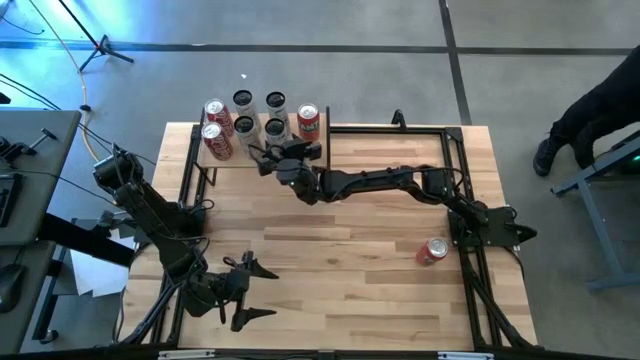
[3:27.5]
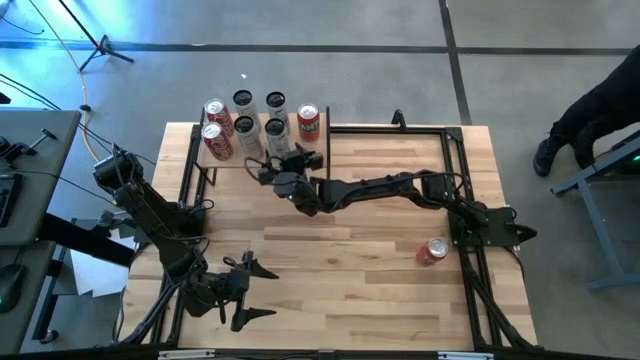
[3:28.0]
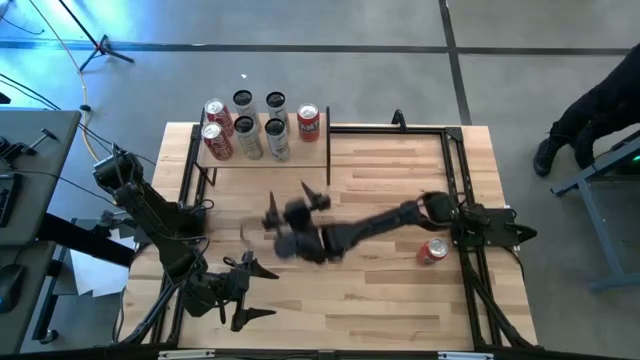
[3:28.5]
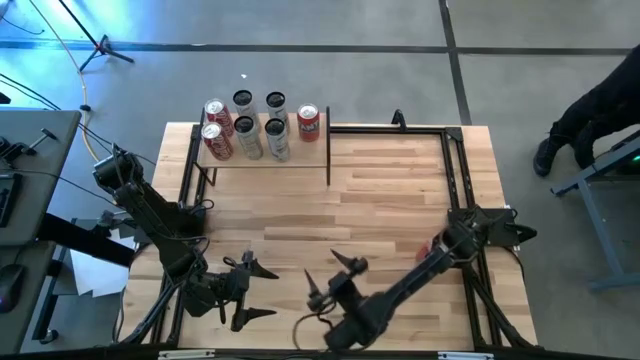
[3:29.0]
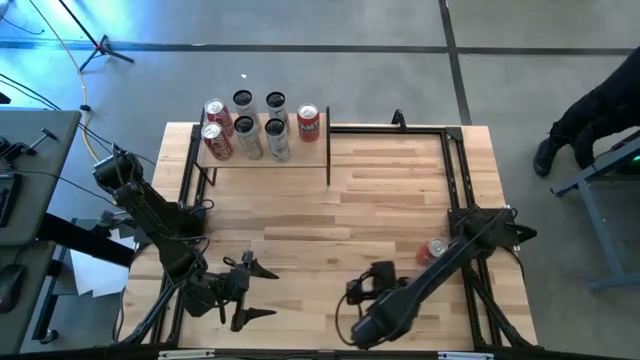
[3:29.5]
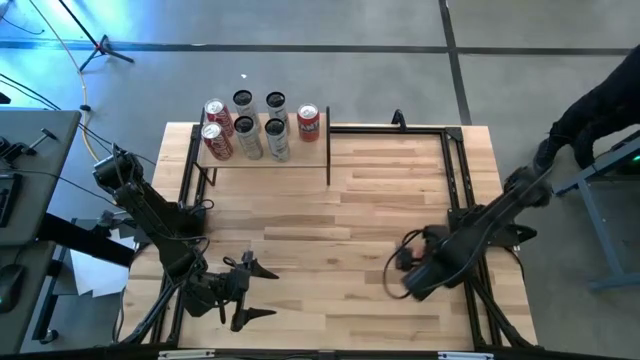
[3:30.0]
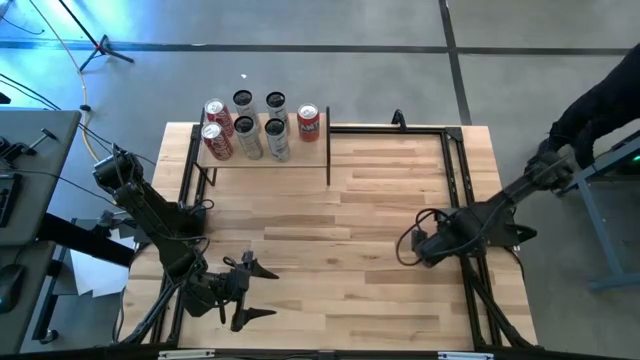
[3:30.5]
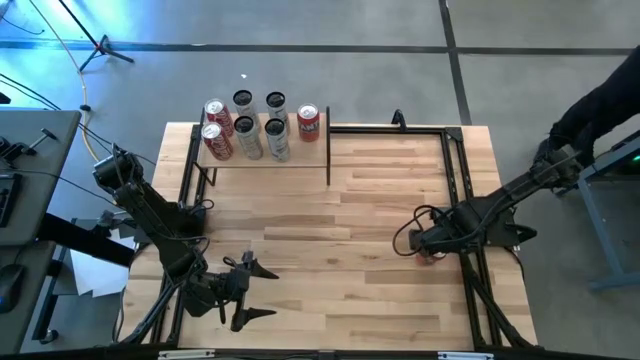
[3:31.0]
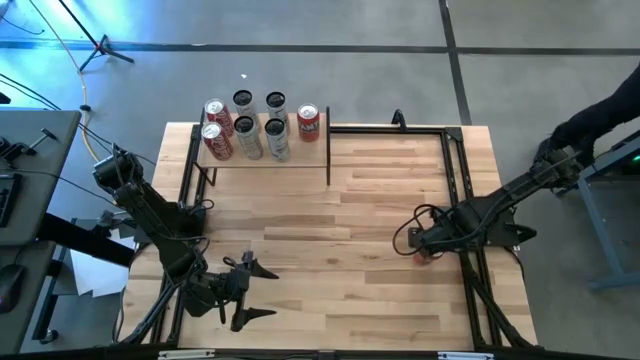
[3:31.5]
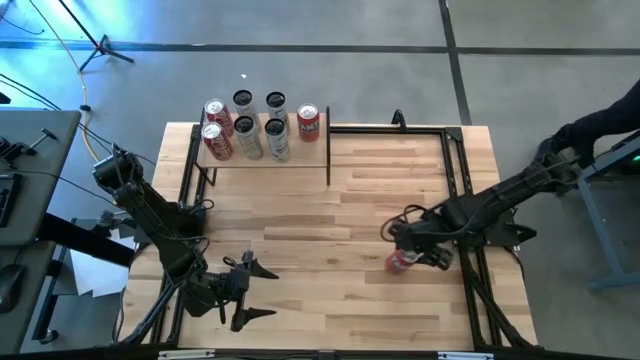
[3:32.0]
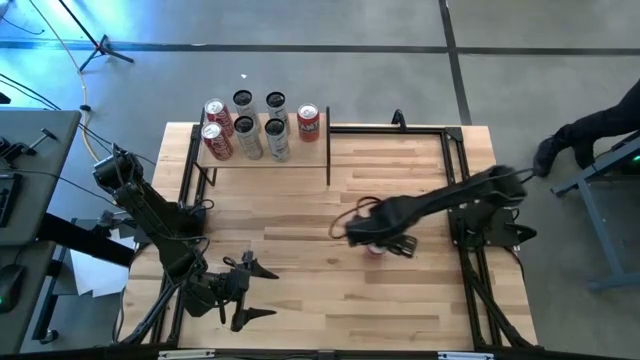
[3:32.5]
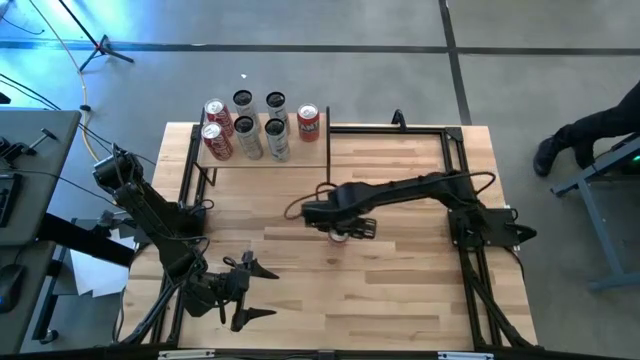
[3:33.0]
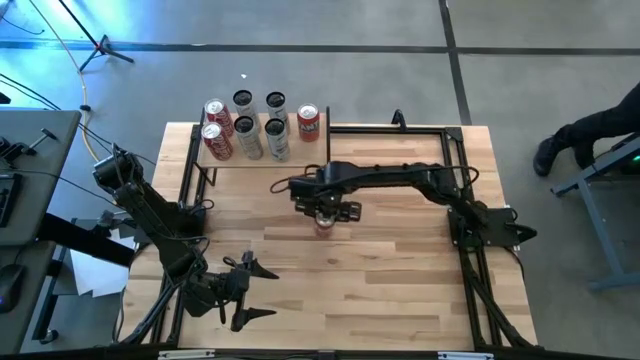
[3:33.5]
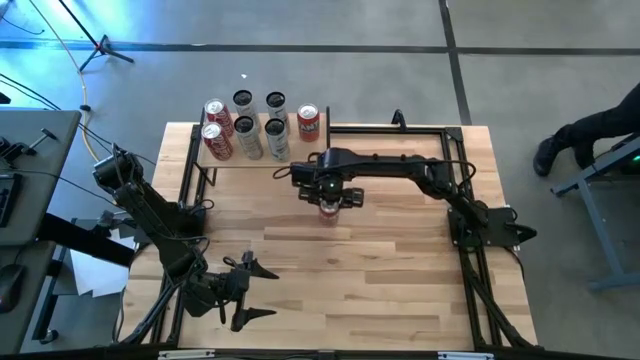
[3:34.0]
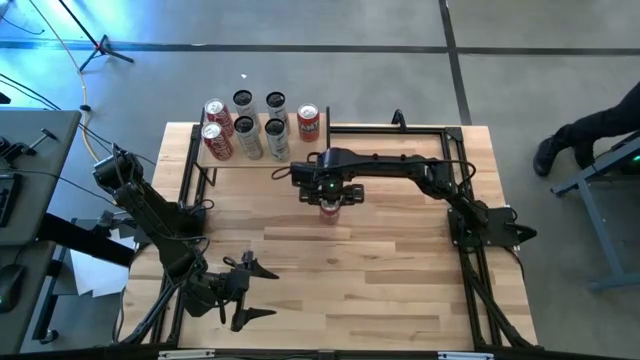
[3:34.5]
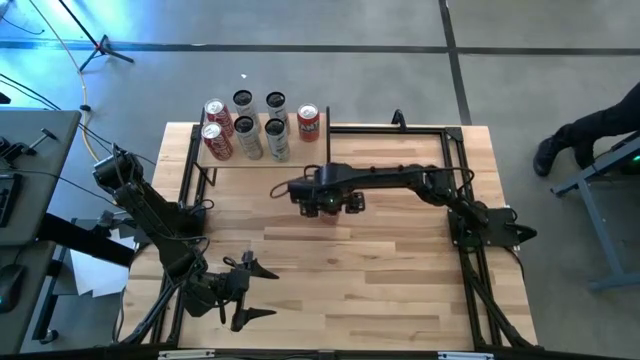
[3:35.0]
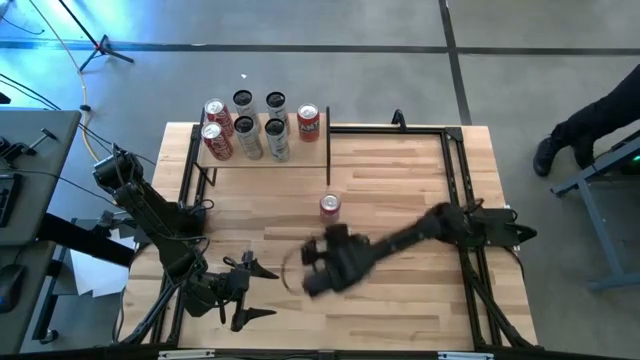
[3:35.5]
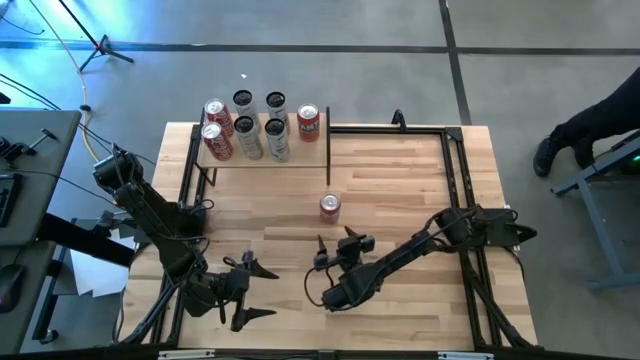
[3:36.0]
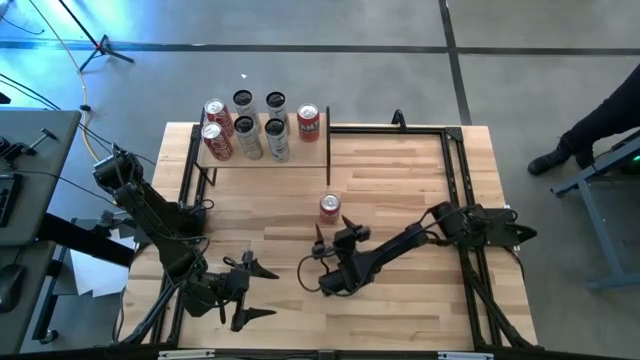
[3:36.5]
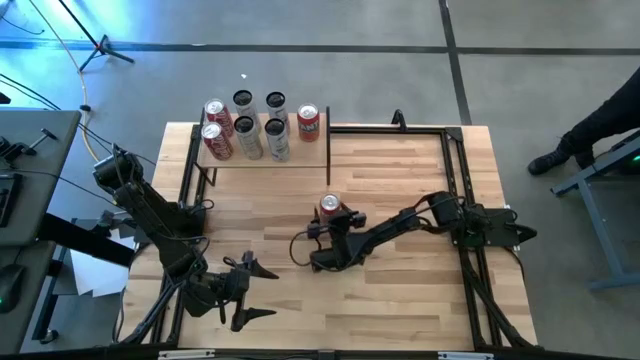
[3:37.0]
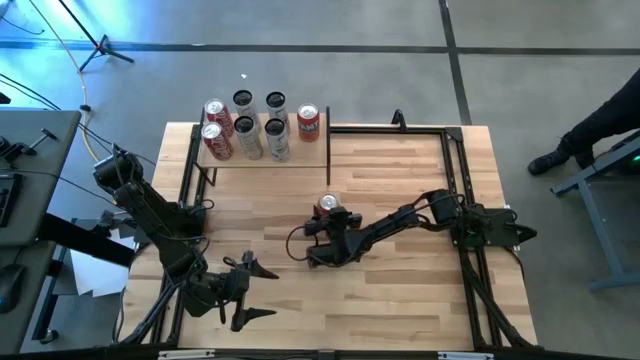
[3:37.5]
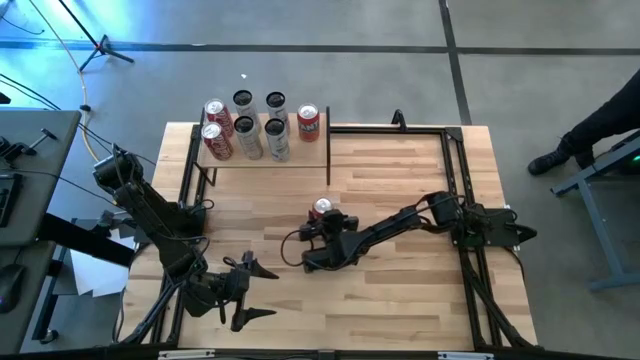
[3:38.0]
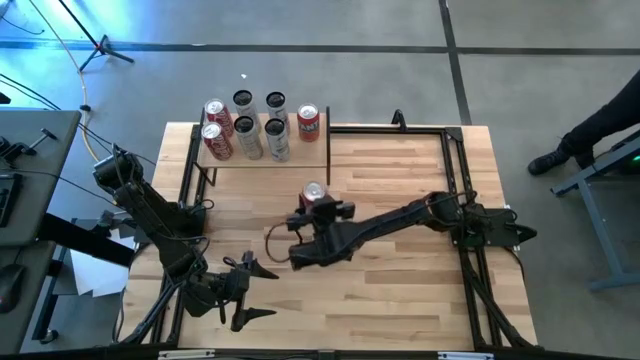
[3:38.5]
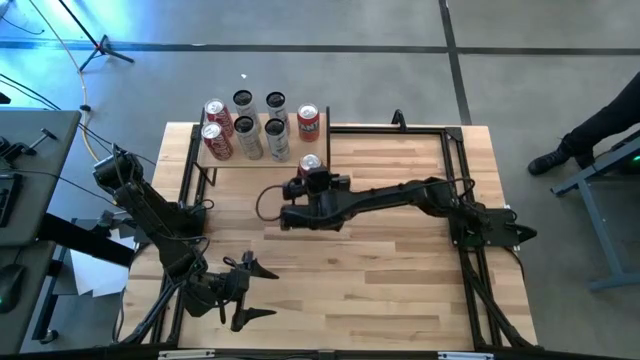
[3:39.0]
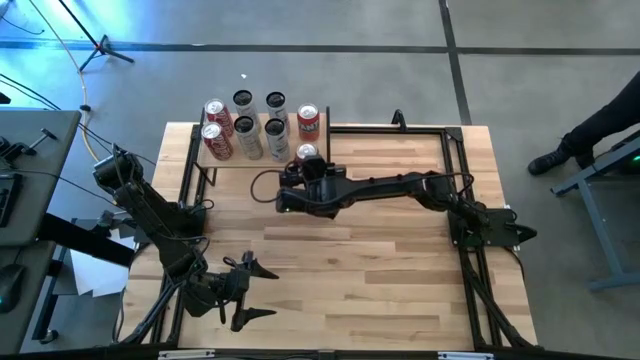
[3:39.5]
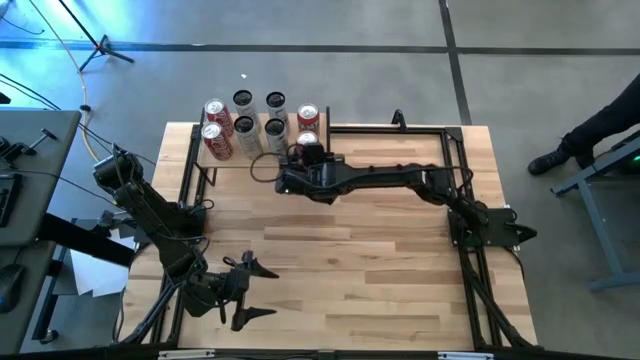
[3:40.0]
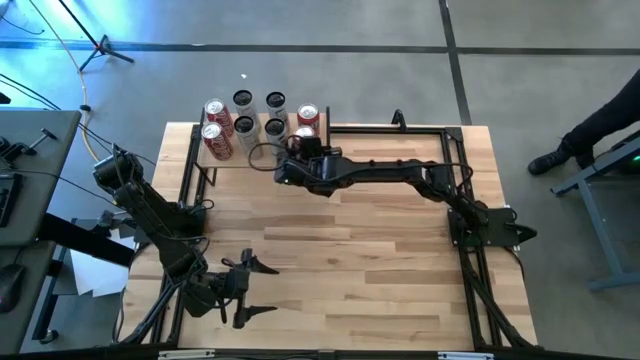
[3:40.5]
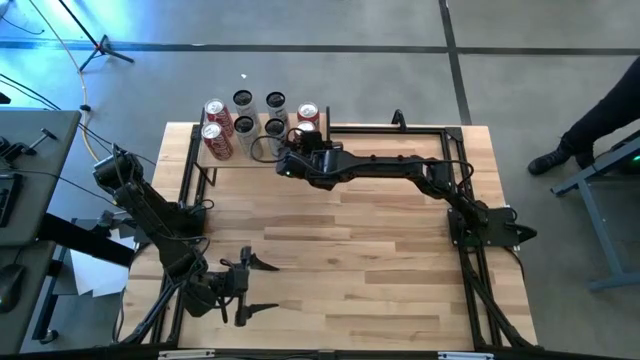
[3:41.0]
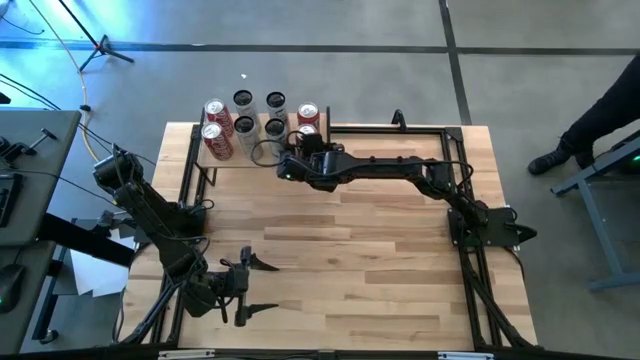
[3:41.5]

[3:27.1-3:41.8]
Task: Place canned beverage on shelf
Put the orange soda can on the shelf aligned with the other orange soda can

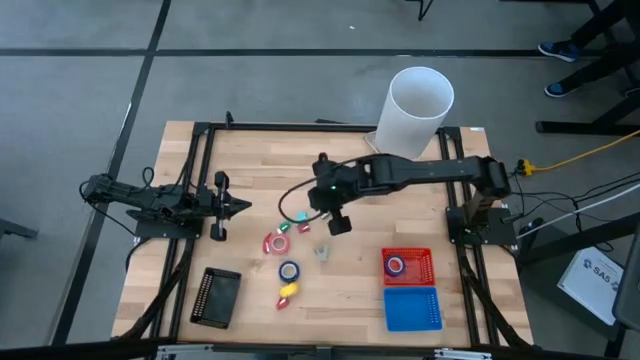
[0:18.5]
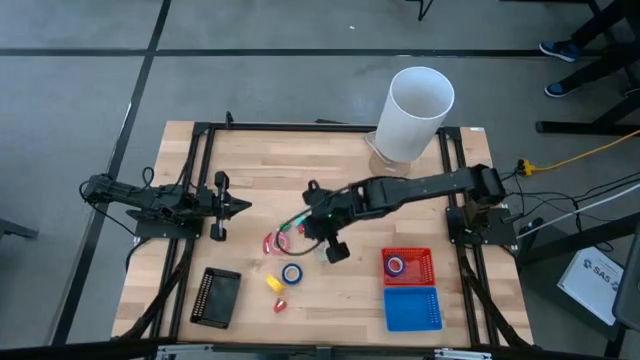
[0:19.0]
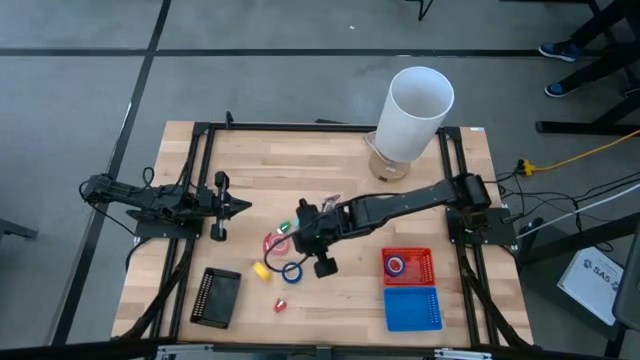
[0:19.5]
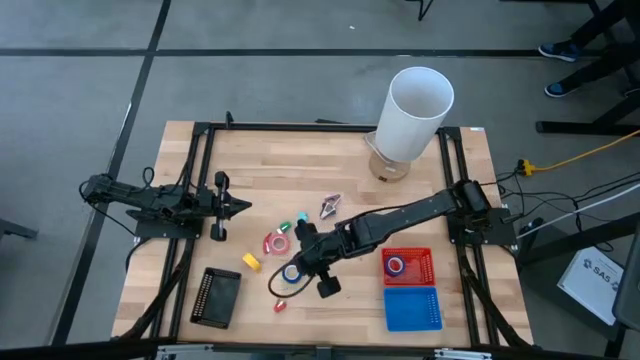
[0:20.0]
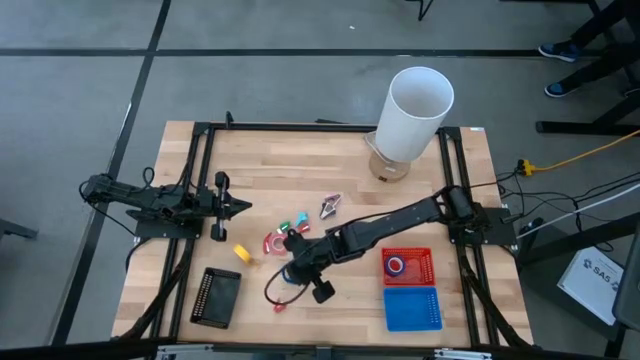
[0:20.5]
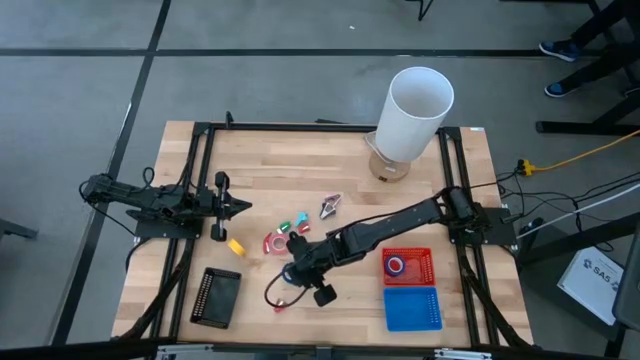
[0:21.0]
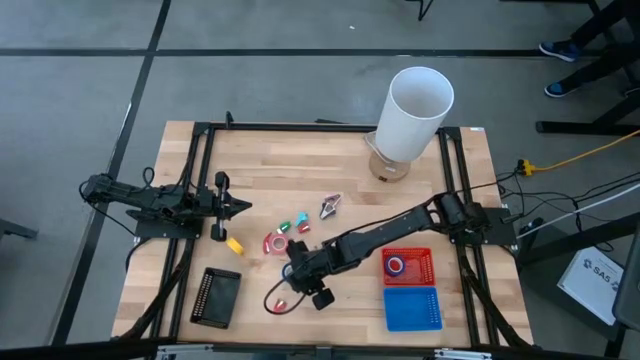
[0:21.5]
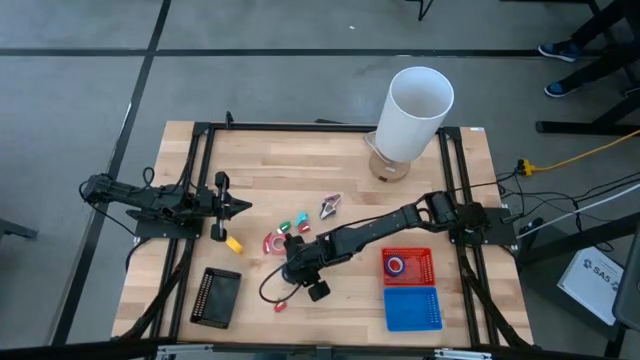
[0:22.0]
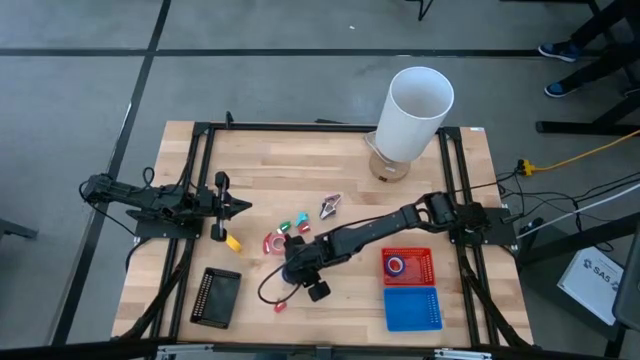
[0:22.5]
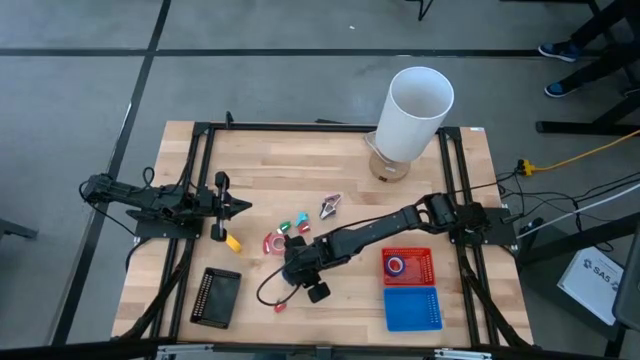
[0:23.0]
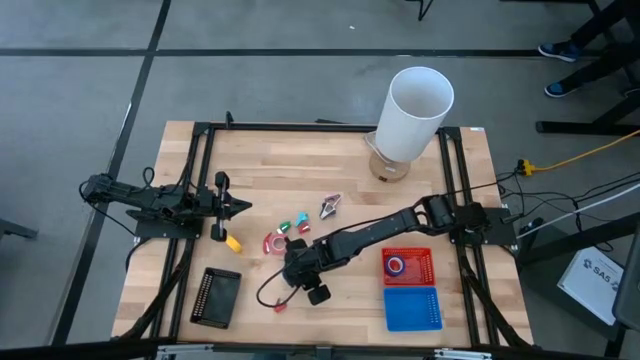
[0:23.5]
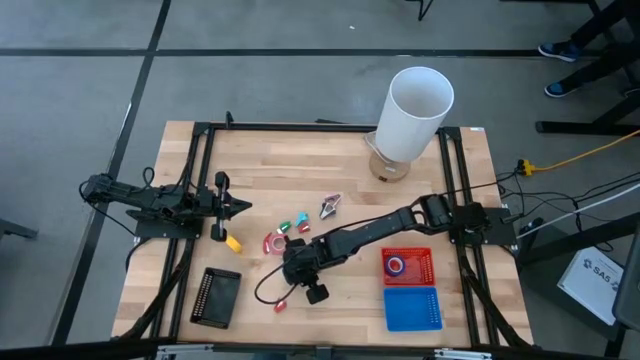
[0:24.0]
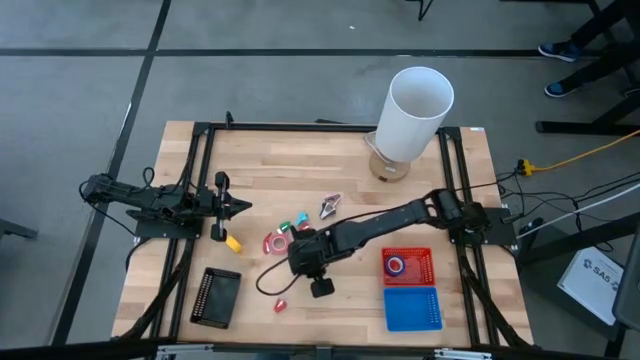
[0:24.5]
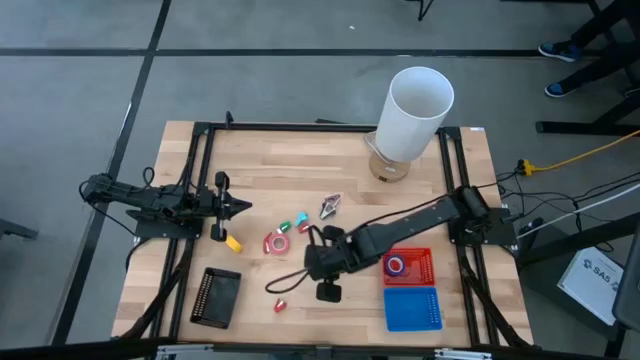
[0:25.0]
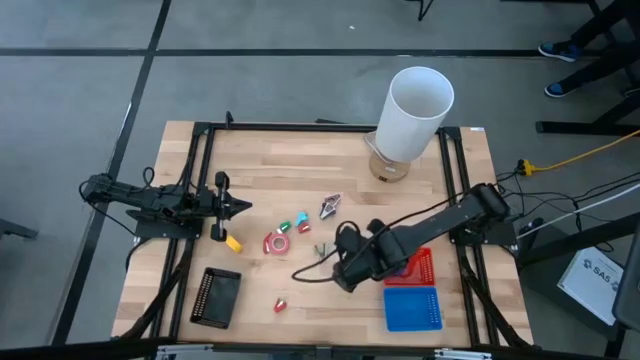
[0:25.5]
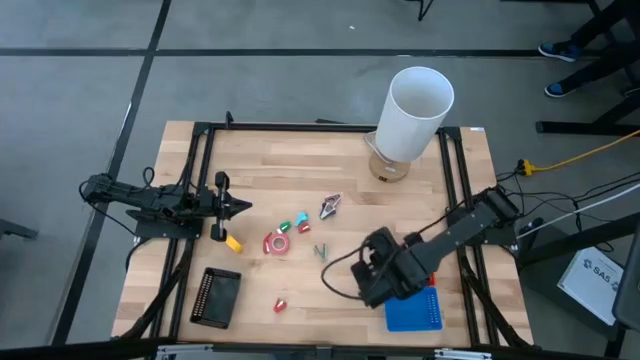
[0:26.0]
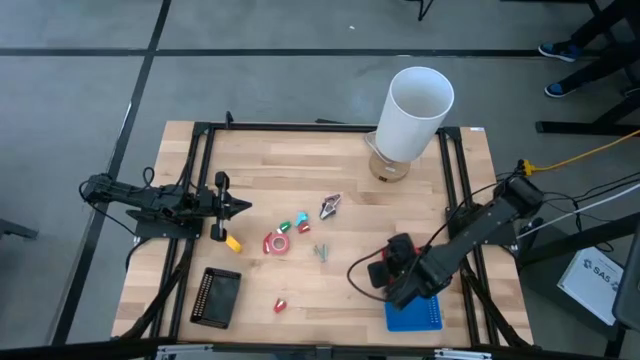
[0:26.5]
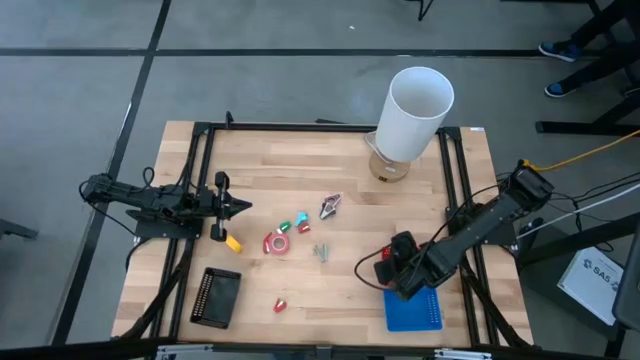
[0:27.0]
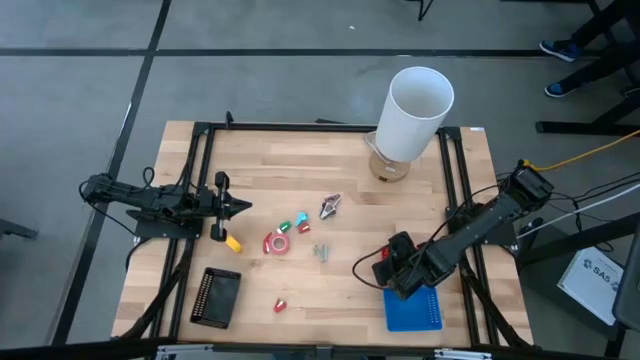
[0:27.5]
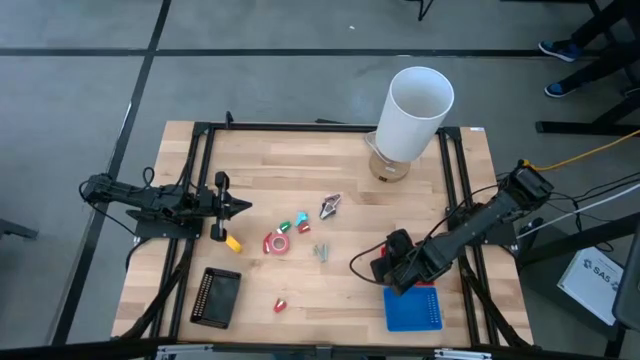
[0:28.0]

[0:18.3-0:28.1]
Task: Pick and place Stapler, Stapler remover, tape
Put the blue tape into the red basket
